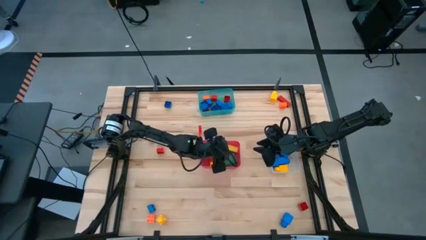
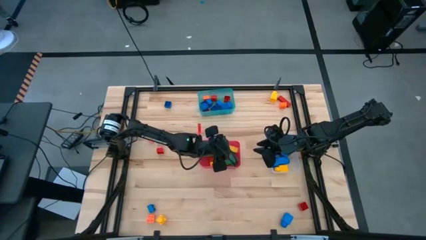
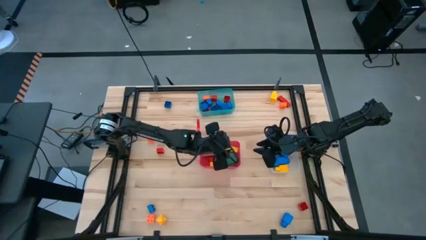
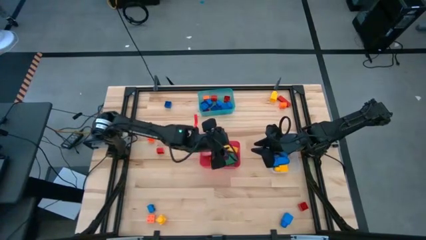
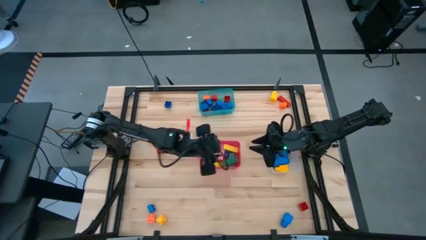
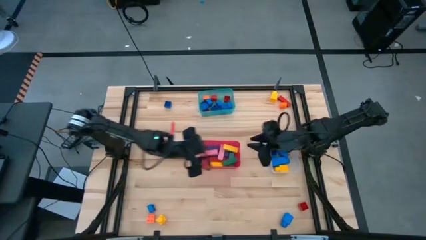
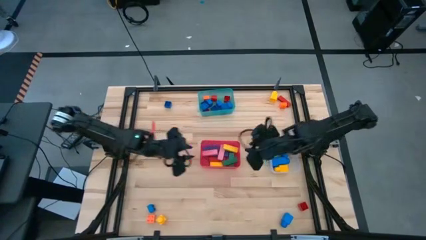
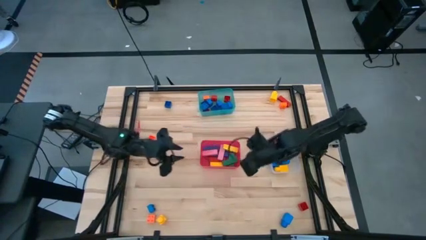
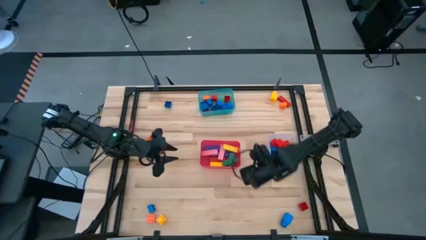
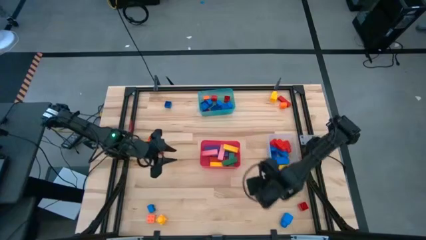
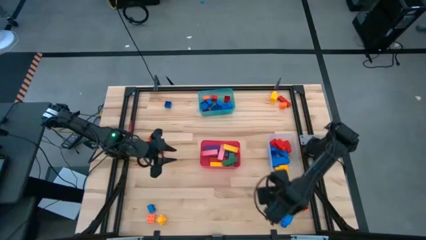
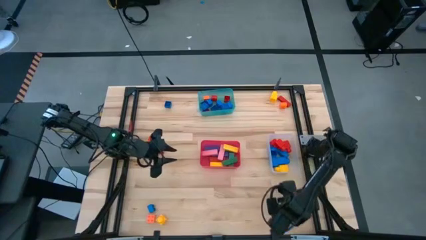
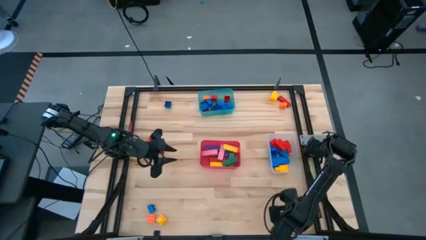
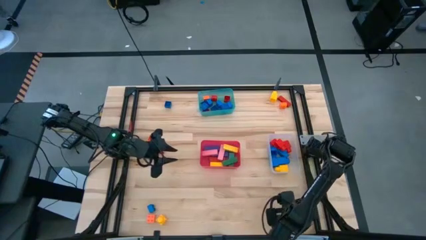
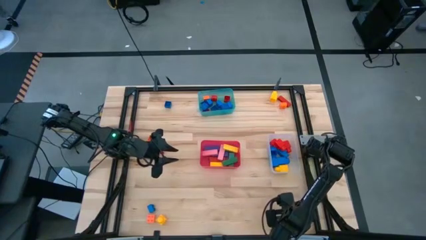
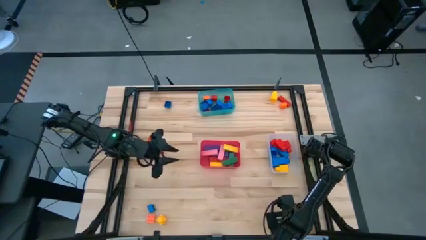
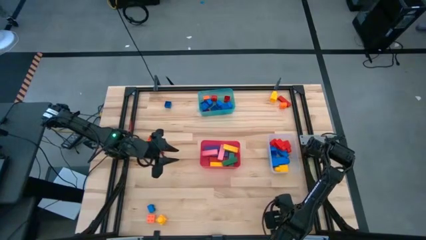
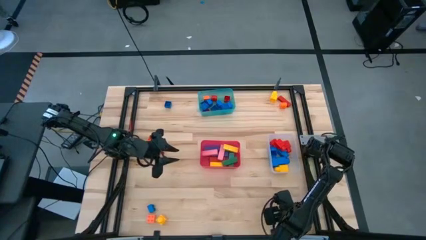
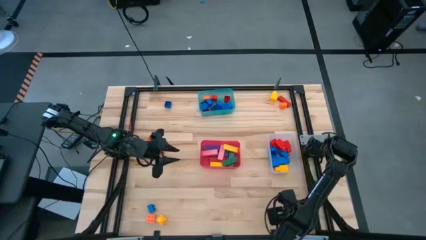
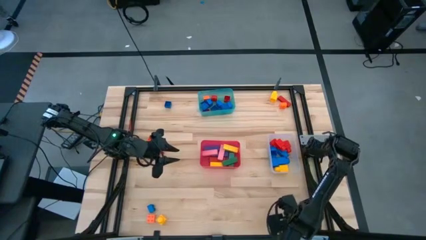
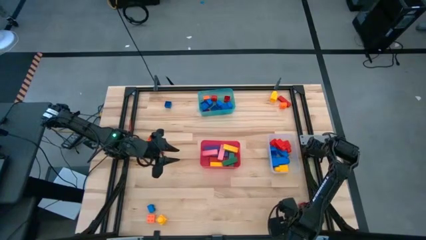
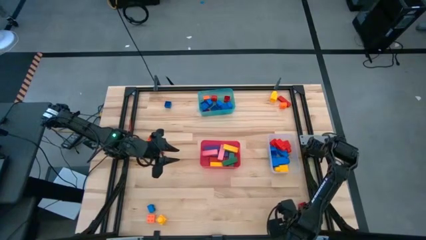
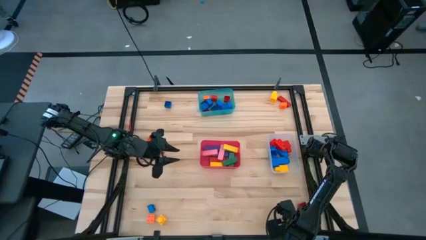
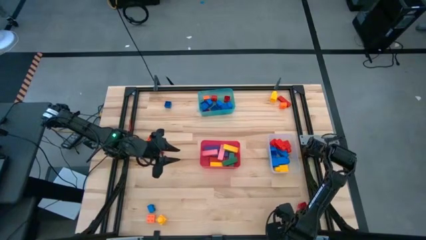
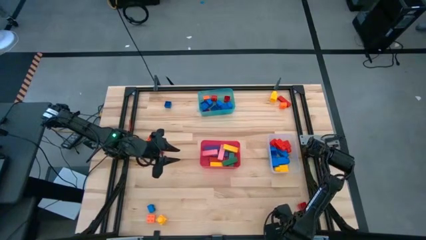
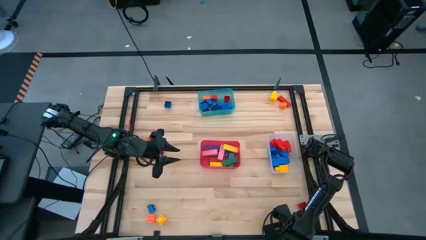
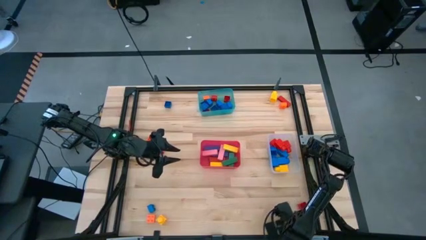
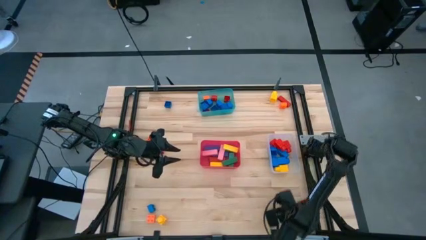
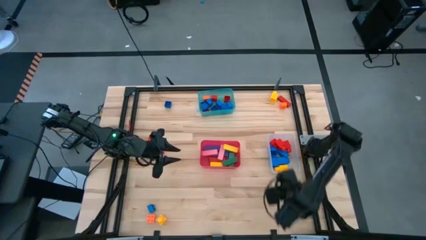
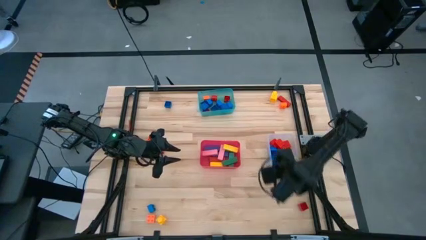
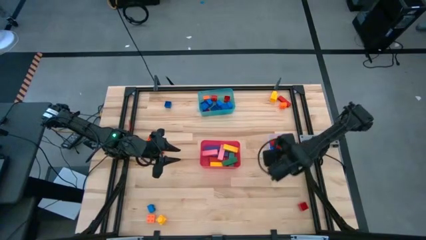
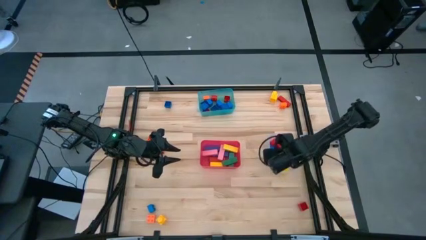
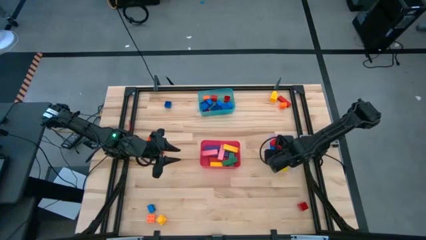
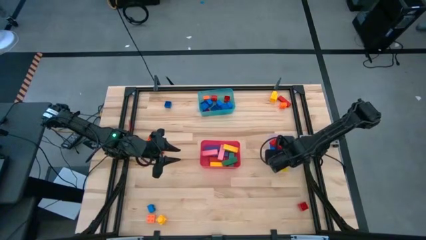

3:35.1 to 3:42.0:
Task: Sort blocks by size
Put the blue 1 stud game piece into the transparent bin

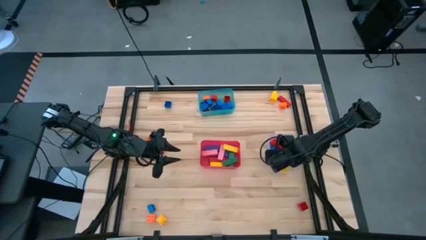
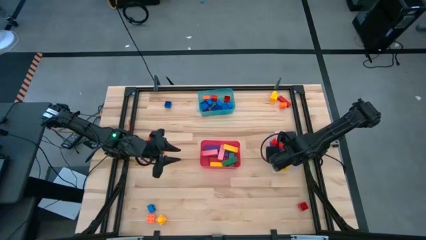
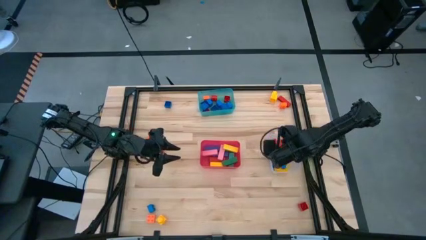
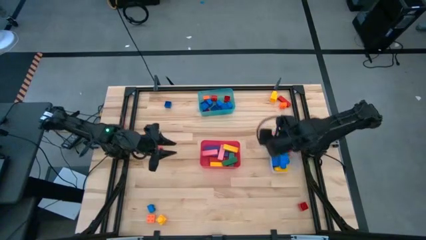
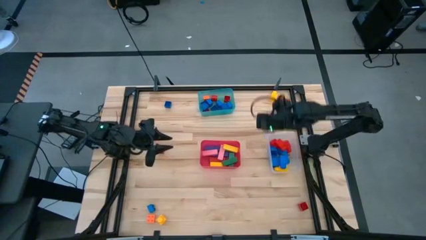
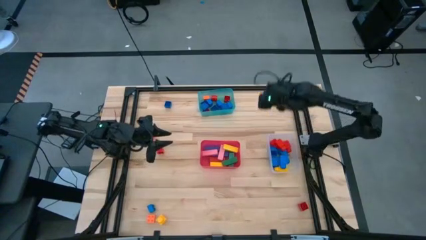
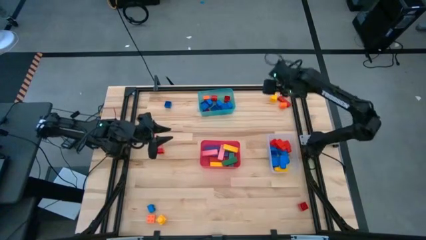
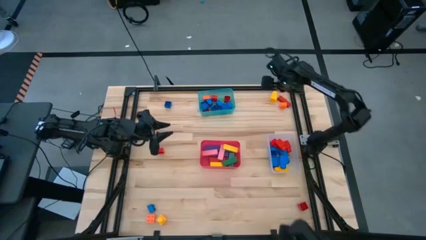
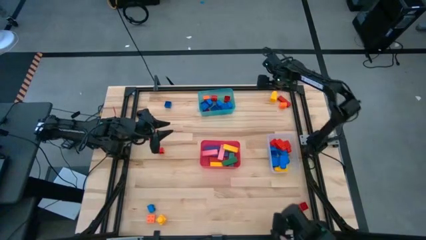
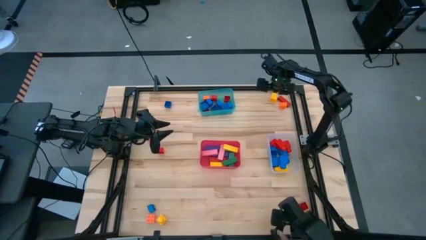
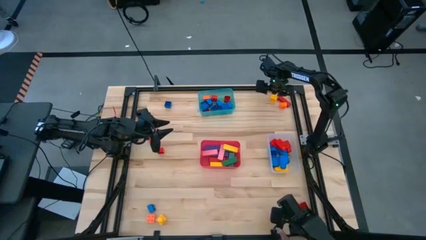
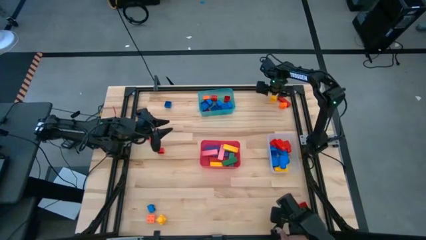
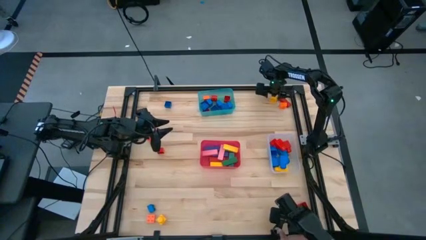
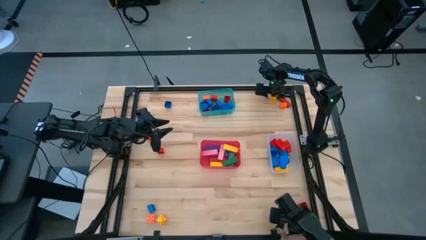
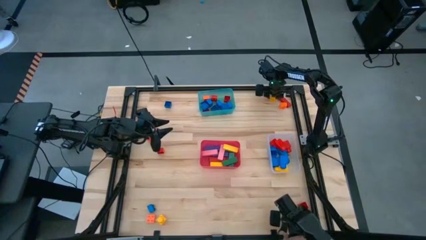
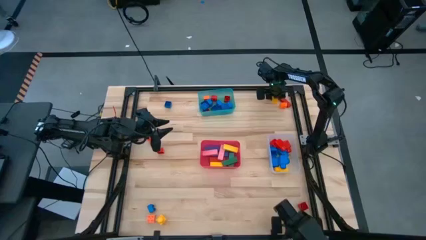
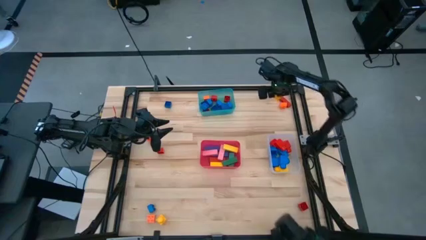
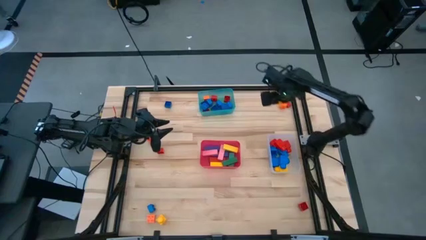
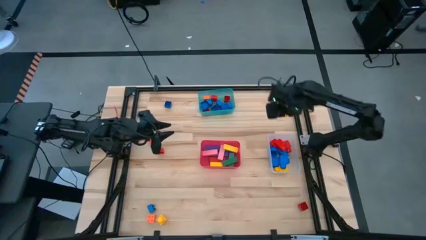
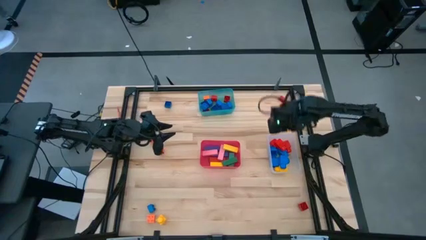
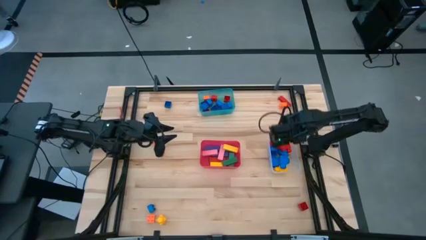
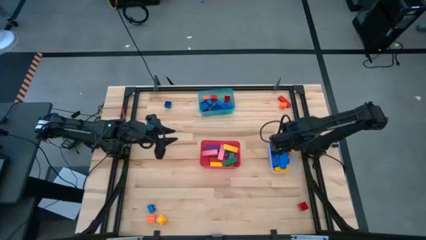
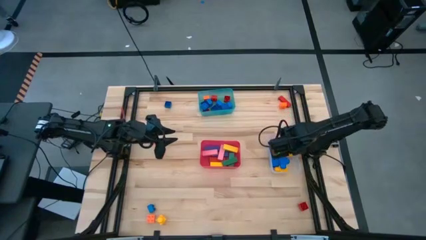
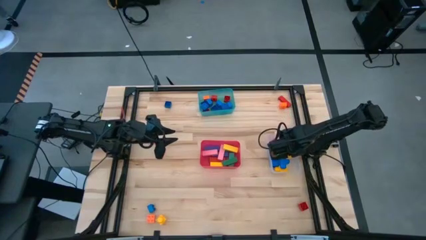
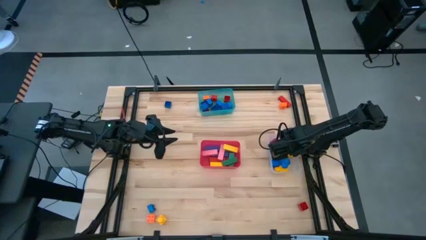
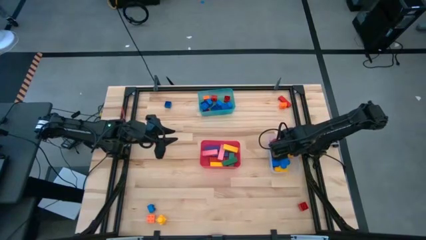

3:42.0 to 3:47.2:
Put the yellow 1 stud game piece into the transparent bin

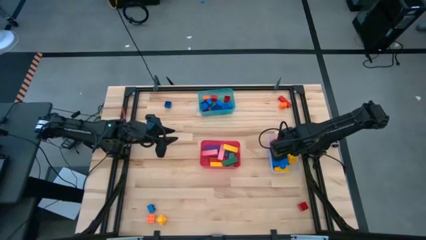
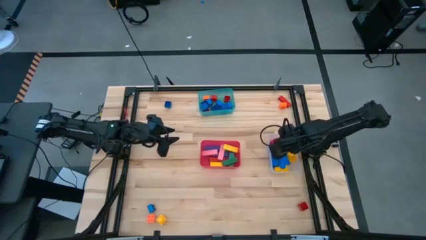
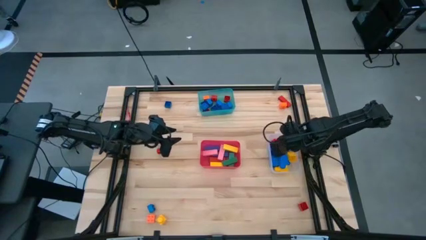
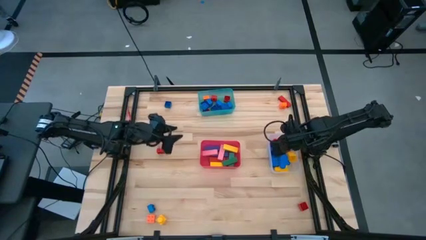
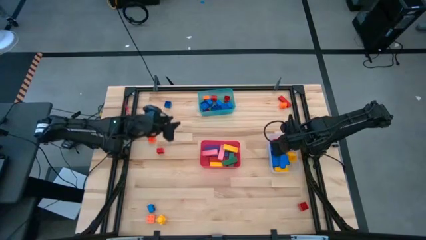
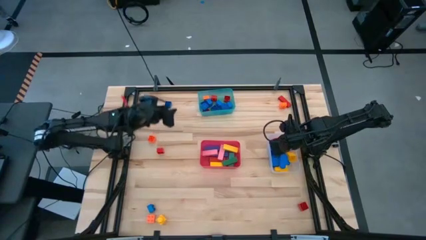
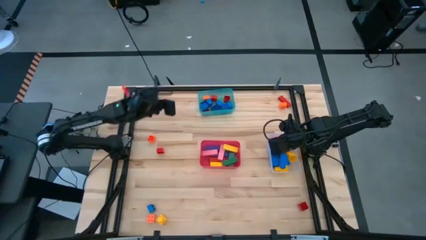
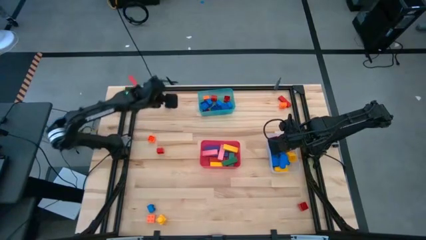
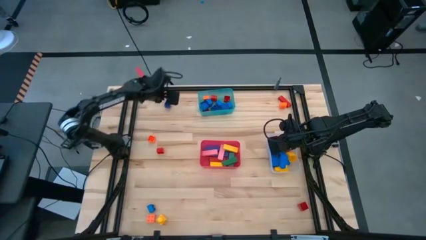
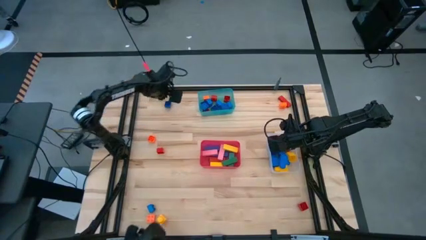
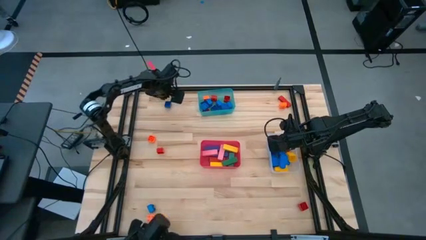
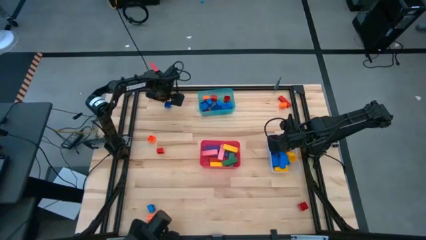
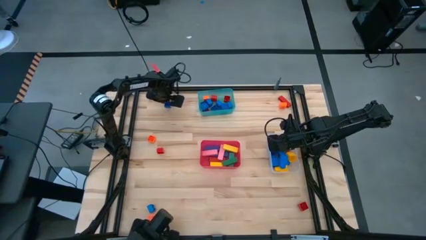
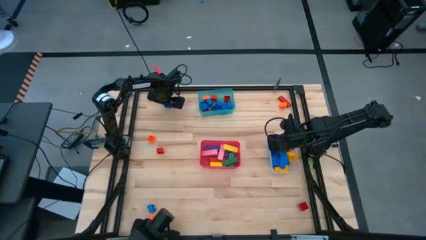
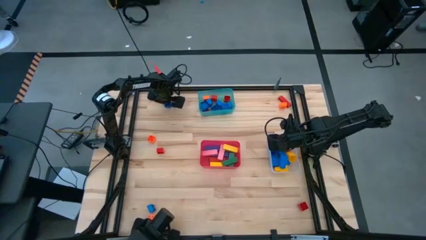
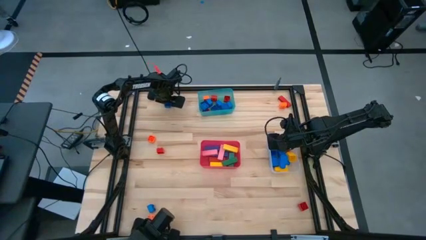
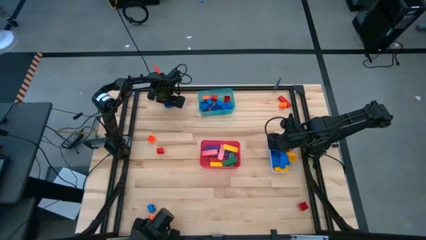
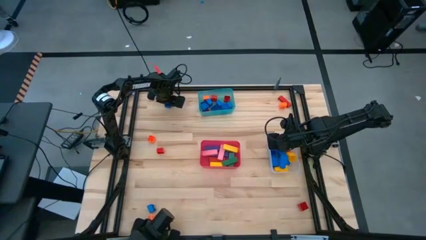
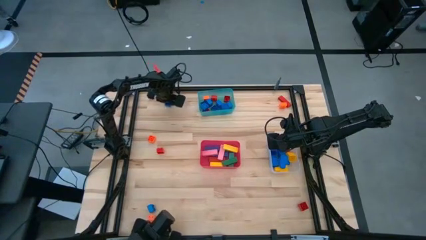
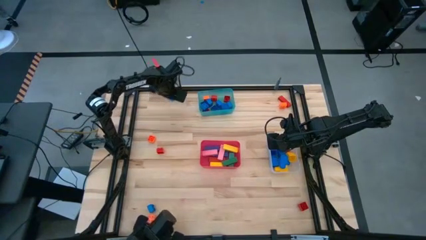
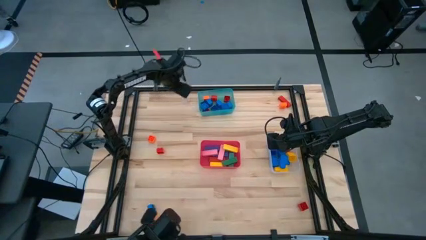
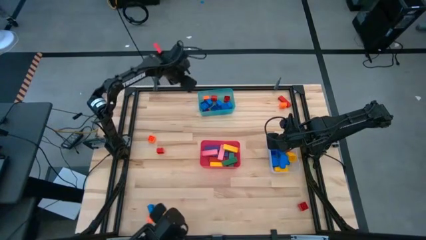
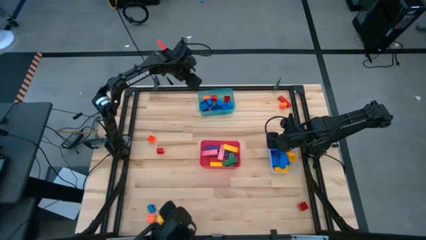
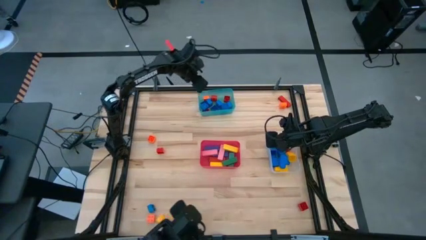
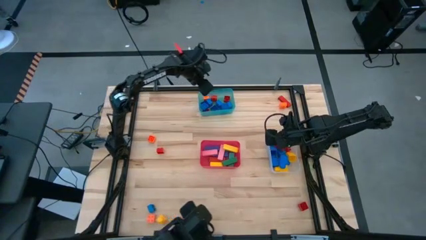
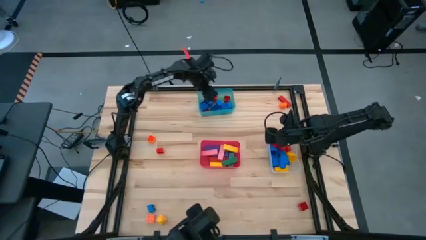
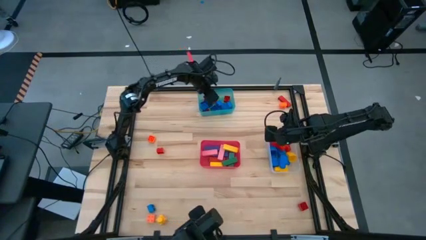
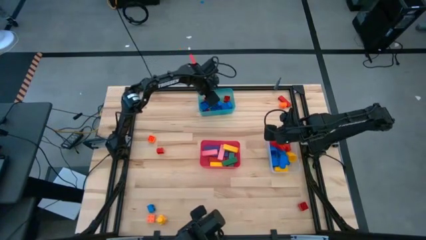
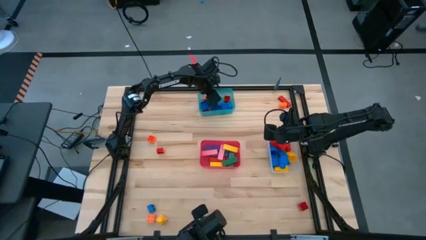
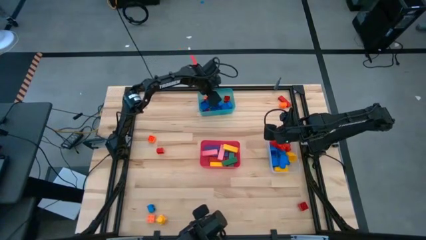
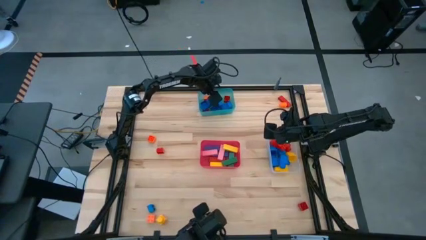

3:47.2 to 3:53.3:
Put the blue 4 stud game piece into the blue bin
